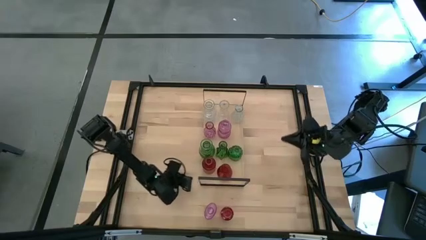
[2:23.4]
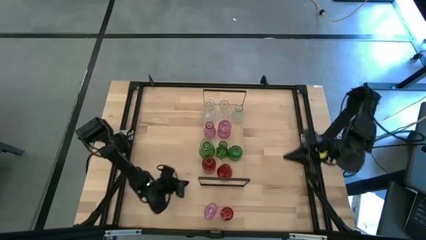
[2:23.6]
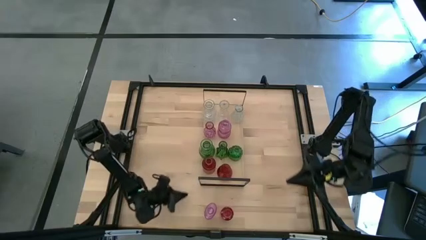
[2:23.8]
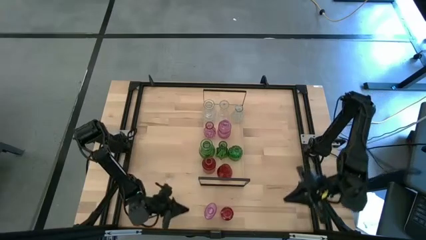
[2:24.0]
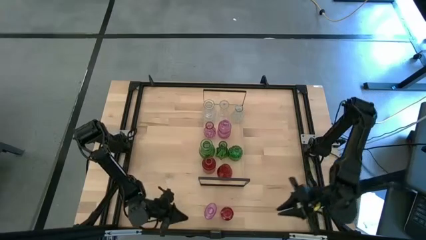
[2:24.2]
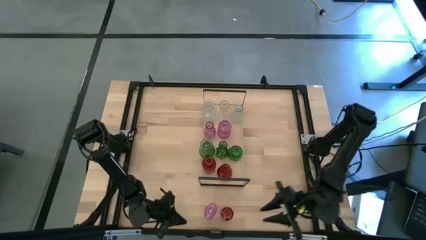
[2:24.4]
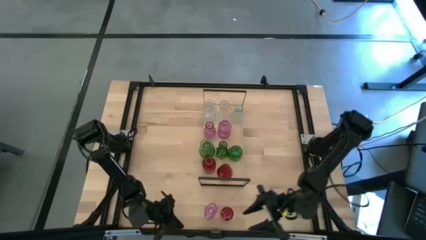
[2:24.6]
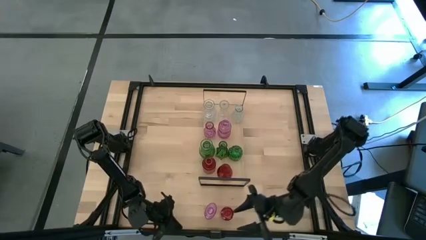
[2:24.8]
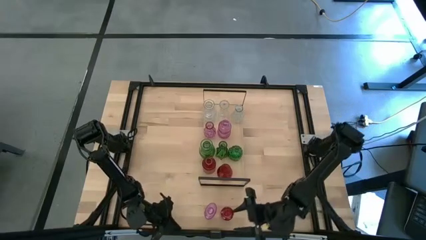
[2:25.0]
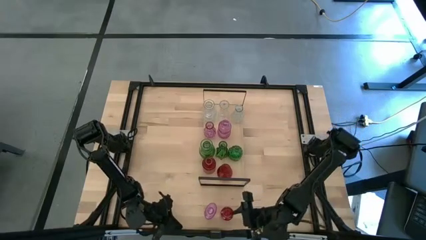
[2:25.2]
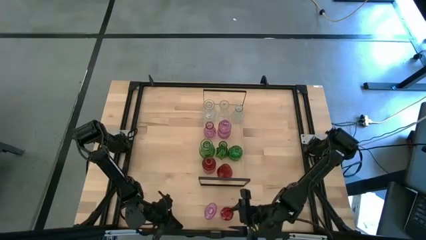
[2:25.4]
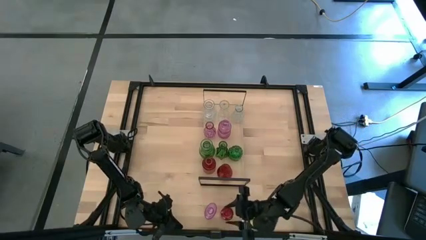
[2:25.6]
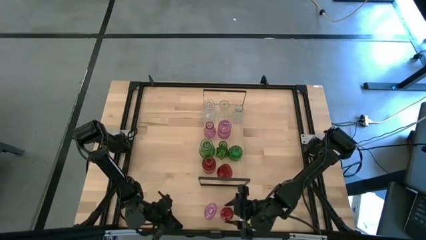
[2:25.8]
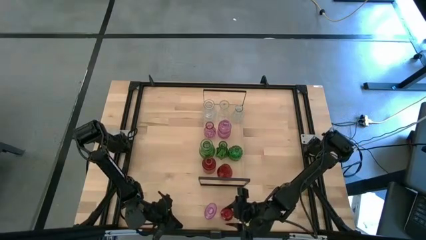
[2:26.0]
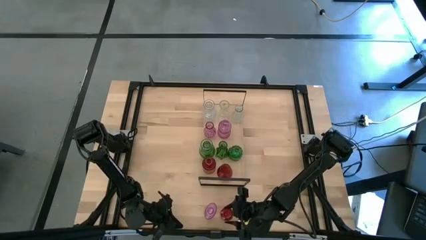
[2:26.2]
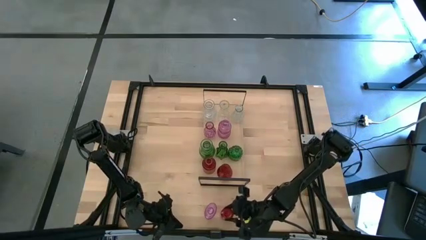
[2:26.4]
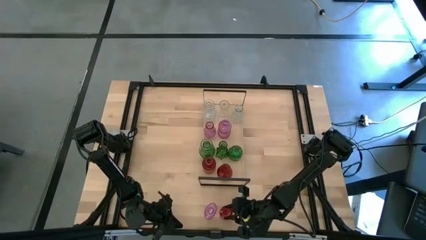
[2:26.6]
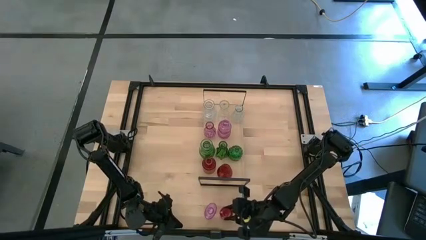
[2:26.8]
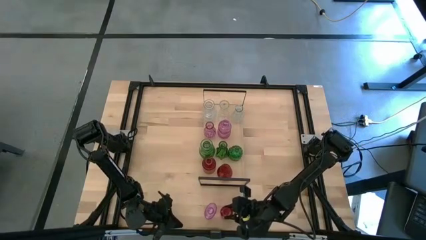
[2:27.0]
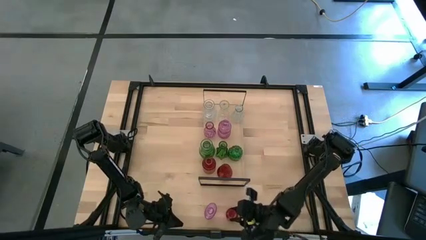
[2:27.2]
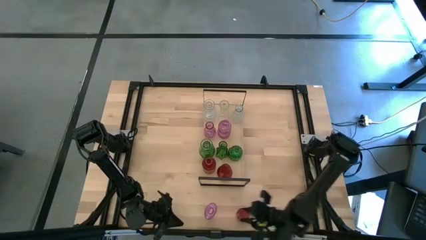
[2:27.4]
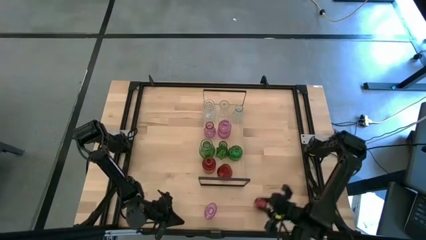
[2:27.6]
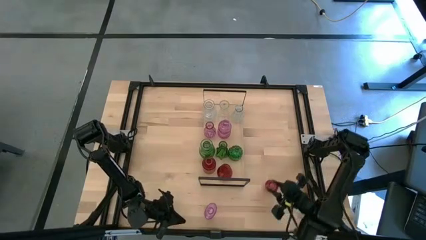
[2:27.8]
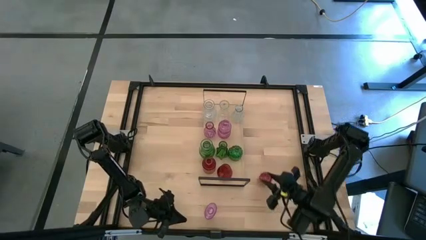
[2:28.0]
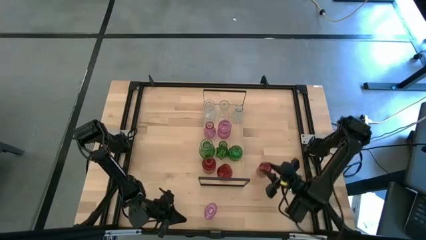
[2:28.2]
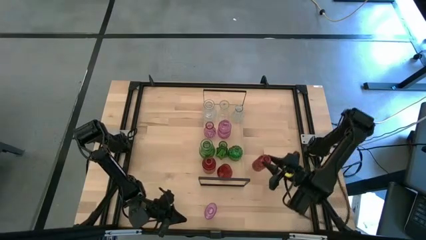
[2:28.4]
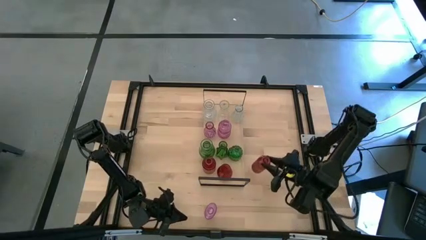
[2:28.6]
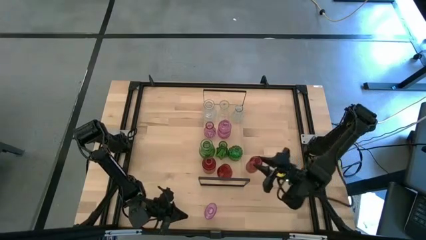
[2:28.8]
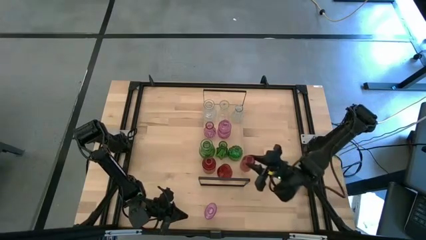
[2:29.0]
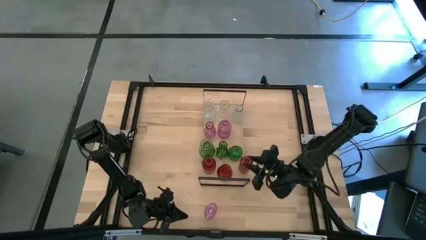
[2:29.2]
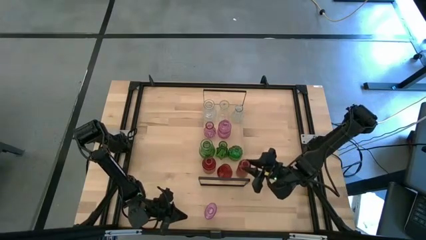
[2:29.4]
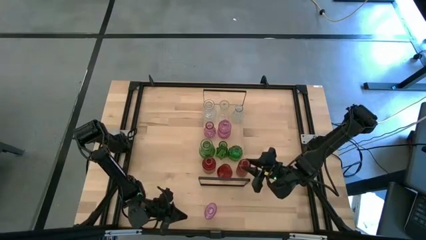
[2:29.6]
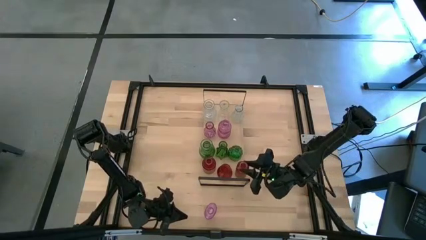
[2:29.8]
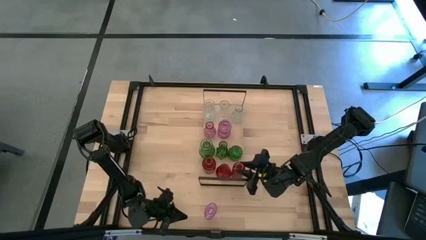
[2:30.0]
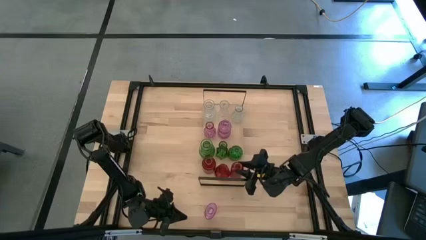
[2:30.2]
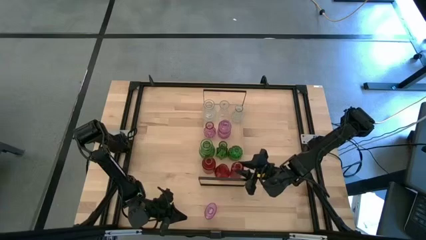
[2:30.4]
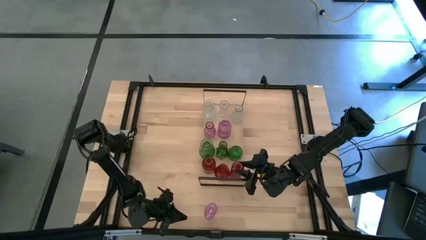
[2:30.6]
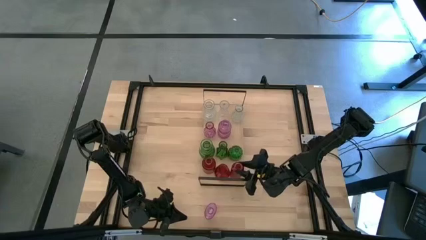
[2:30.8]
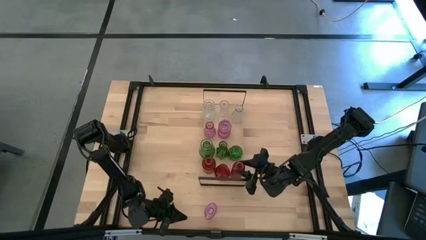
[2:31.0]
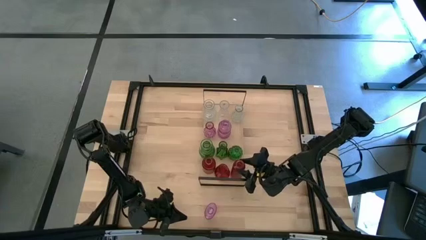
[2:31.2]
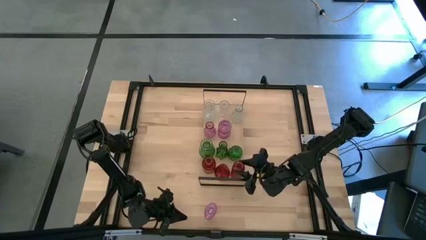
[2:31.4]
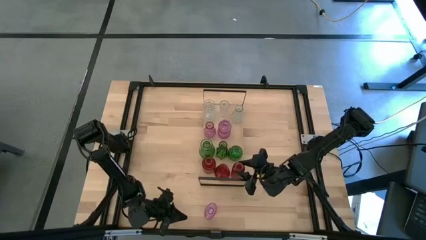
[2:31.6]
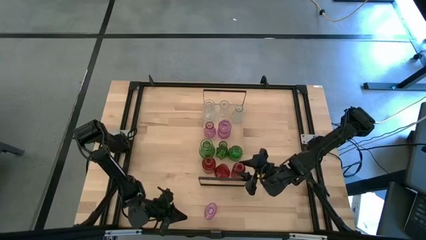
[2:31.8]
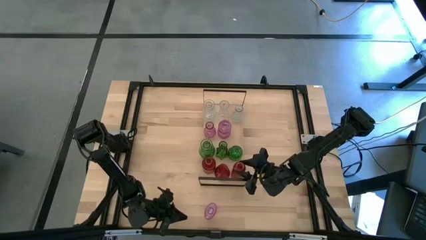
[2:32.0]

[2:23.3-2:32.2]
Task: sort vases onto shelf
Put the red vase on the shelf aligned with the other red vases

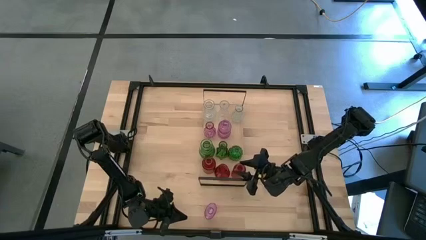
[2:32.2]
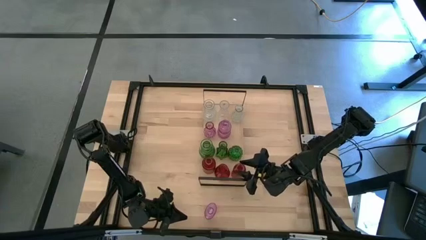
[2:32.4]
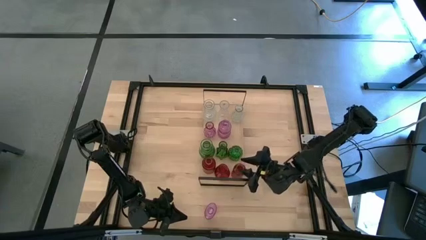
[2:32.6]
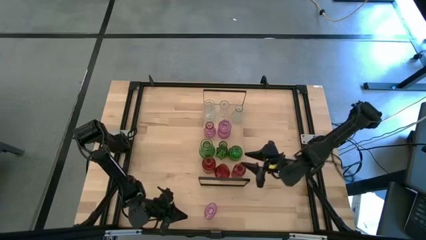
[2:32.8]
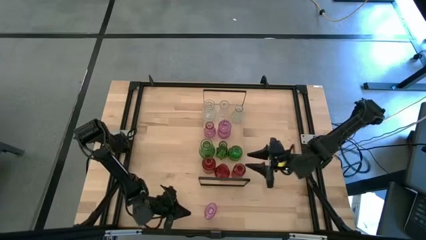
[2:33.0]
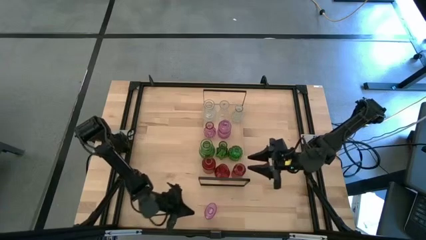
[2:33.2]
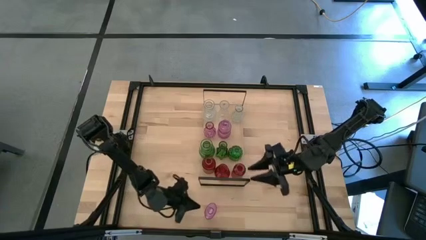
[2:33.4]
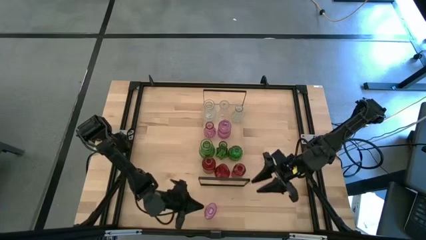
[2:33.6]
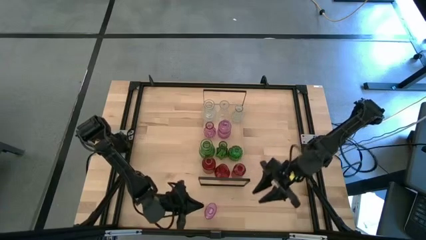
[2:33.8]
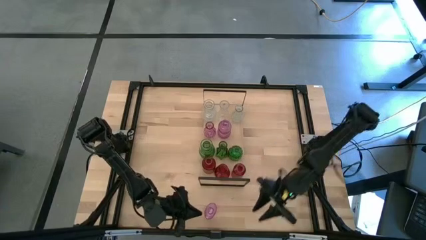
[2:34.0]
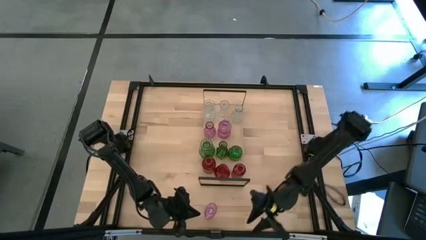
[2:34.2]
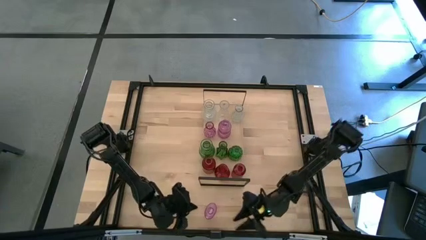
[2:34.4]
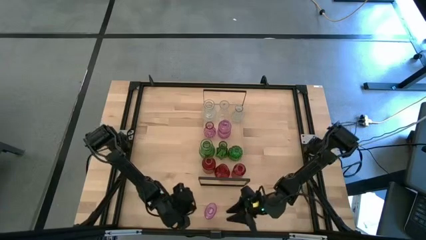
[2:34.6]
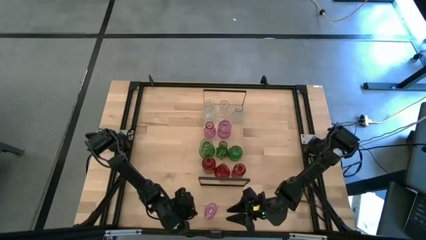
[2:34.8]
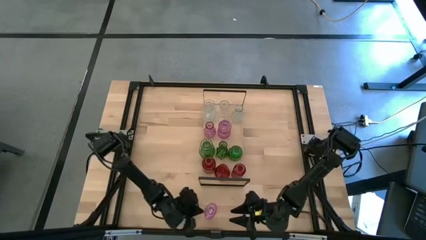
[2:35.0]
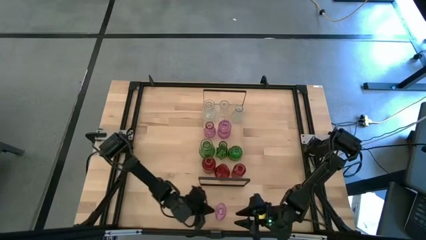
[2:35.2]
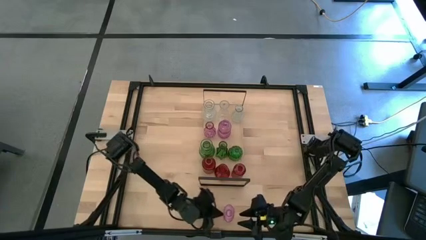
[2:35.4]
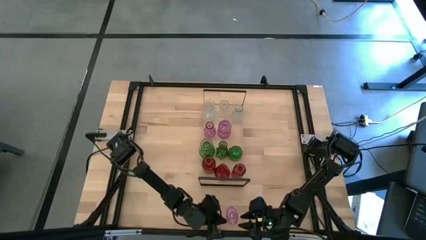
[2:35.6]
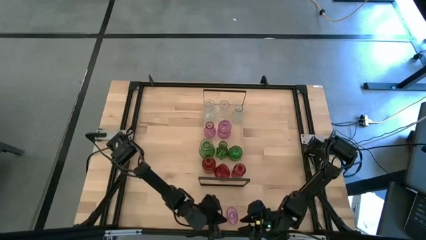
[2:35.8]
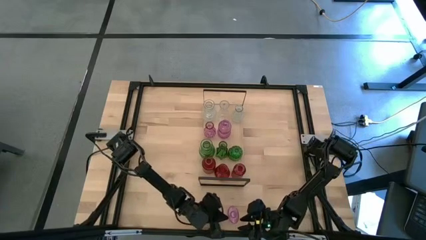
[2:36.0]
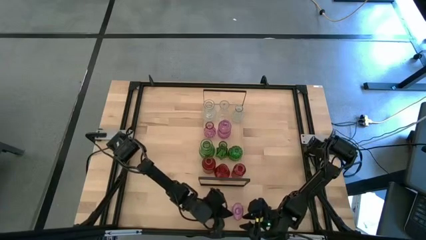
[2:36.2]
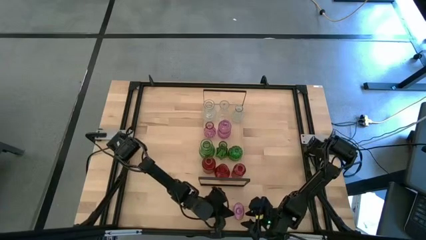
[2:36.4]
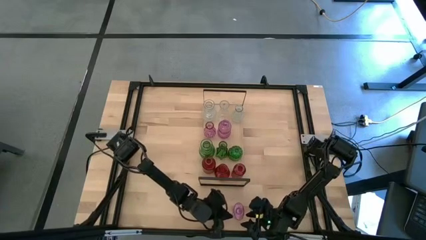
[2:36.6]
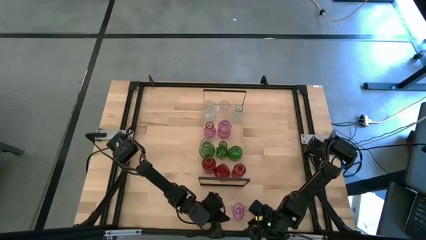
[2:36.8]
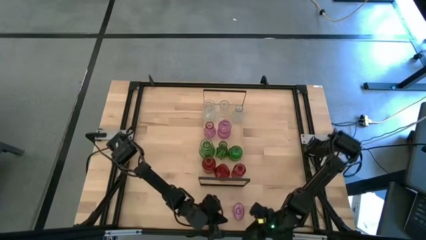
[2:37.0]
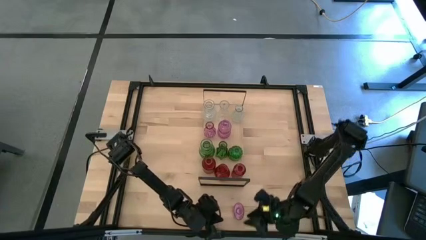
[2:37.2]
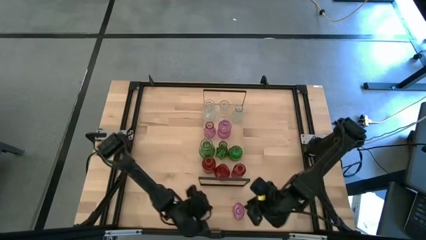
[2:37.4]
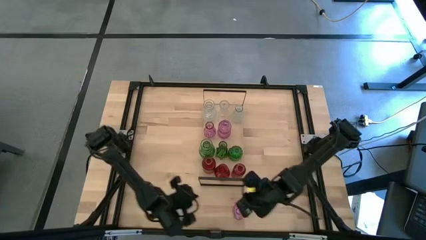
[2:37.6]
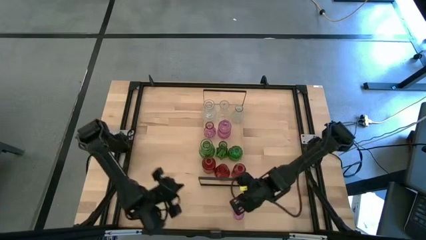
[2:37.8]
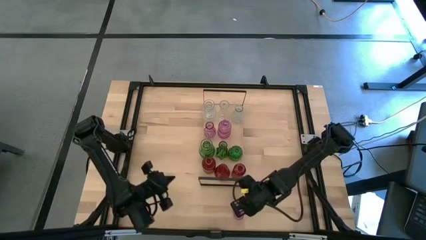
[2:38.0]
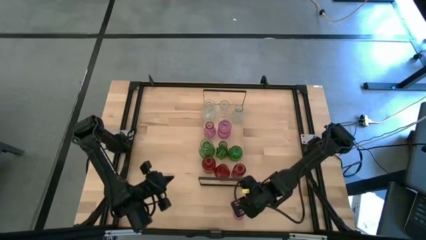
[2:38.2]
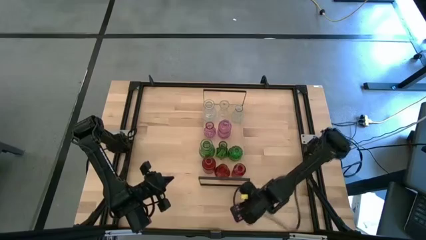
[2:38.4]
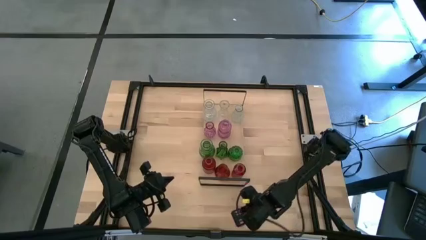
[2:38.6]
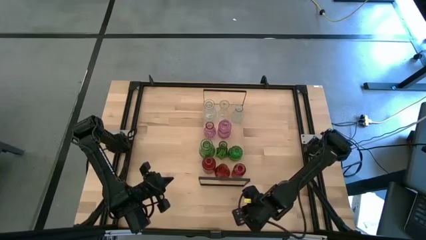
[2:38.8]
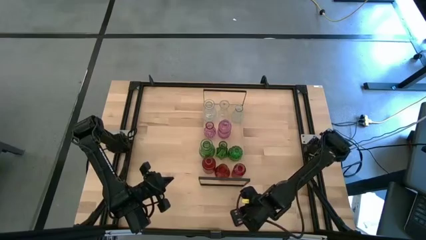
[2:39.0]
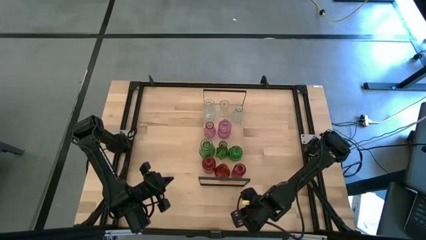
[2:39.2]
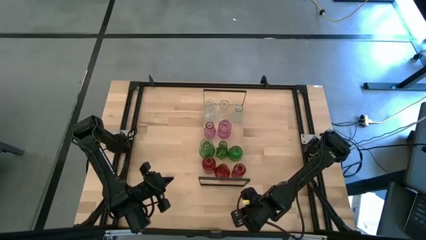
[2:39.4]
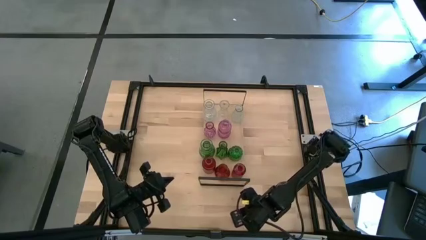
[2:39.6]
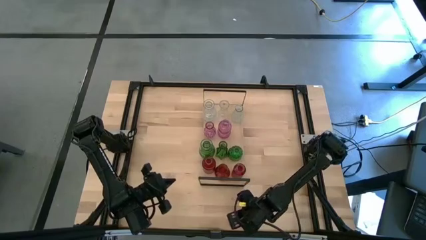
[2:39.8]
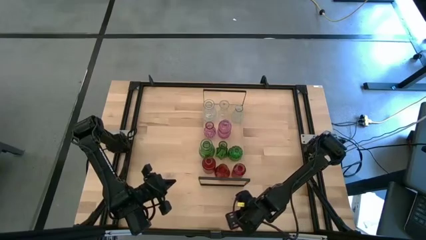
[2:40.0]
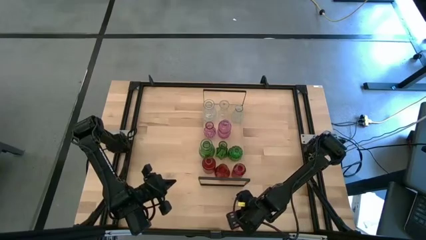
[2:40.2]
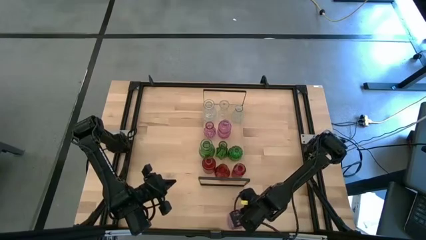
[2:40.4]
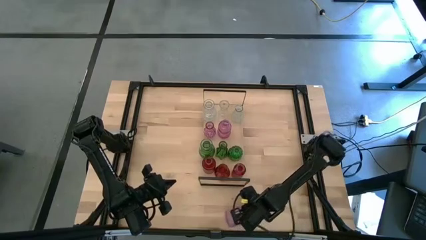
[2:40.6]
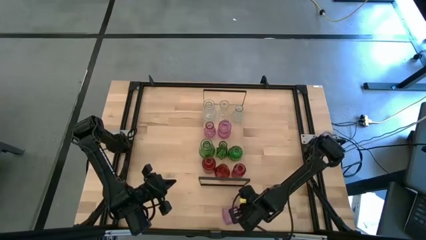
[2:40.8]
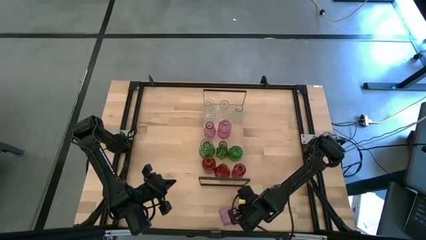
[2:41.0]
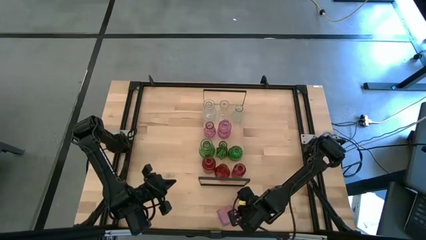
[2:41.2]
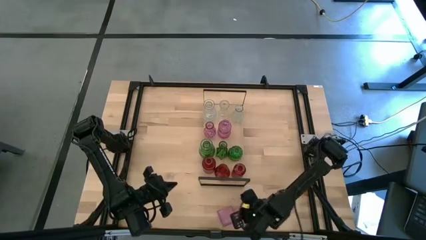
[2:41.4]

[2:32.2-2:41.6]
Put the purple vase on the shelf aligned with the other purple vases
